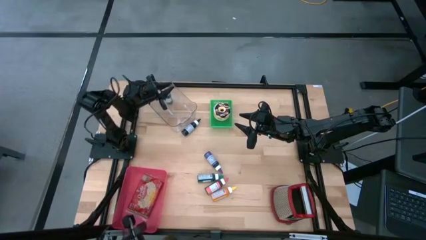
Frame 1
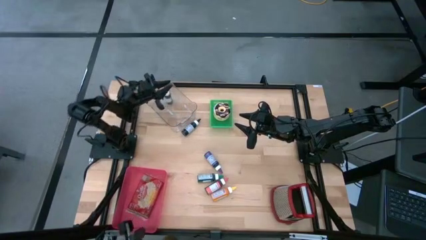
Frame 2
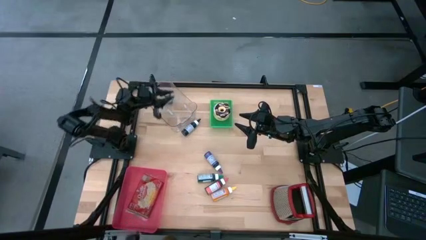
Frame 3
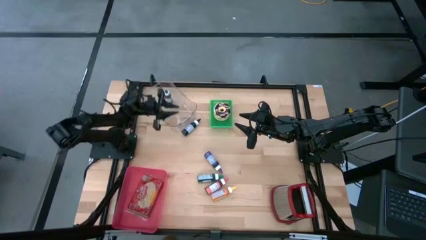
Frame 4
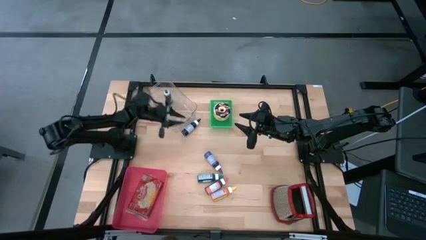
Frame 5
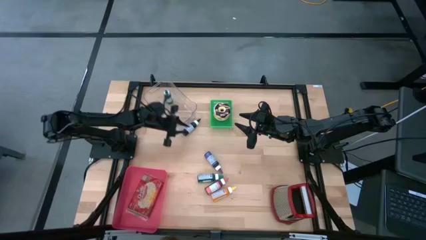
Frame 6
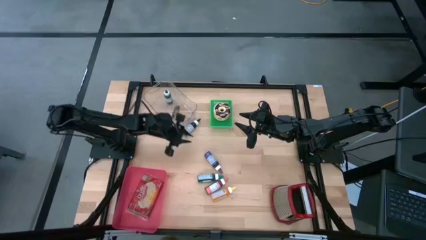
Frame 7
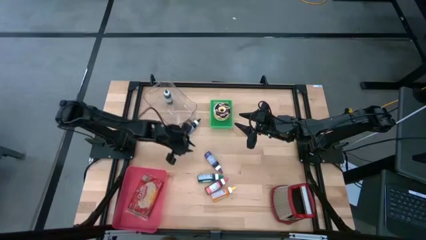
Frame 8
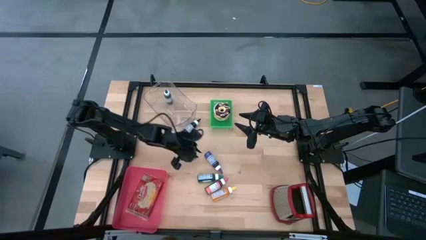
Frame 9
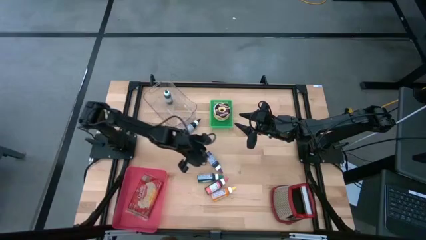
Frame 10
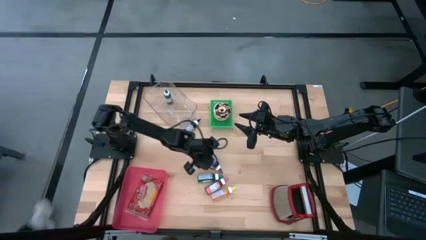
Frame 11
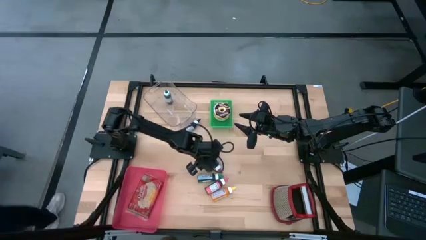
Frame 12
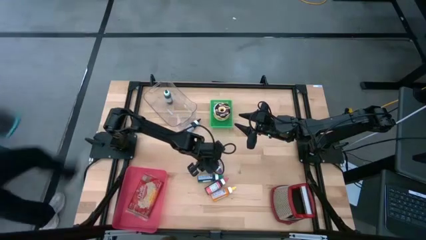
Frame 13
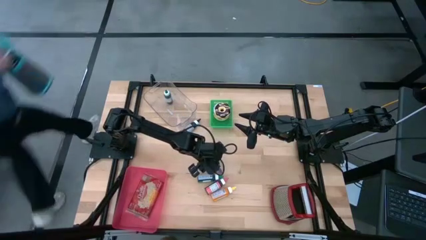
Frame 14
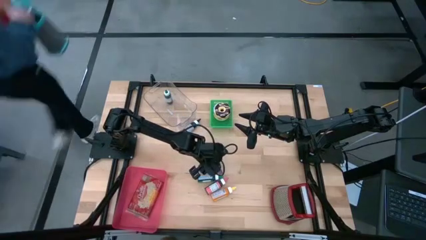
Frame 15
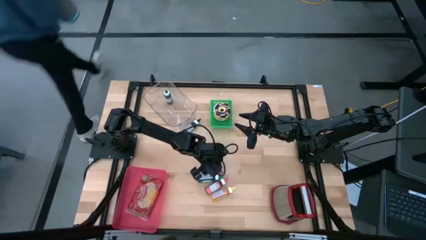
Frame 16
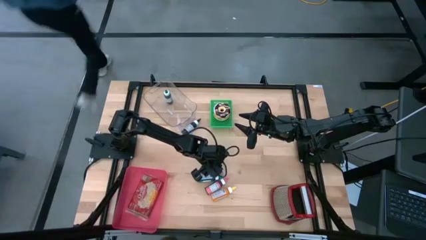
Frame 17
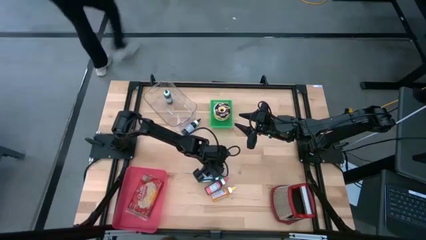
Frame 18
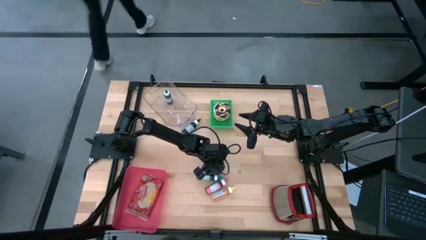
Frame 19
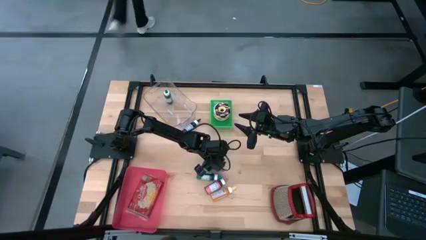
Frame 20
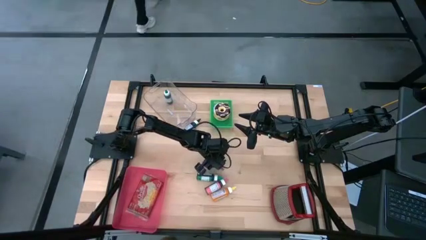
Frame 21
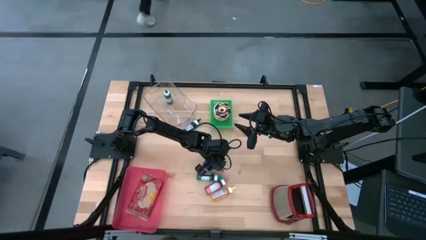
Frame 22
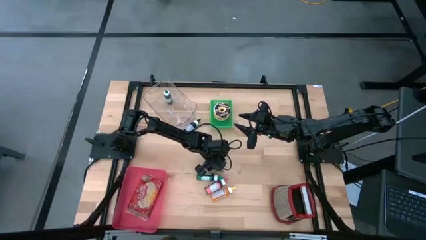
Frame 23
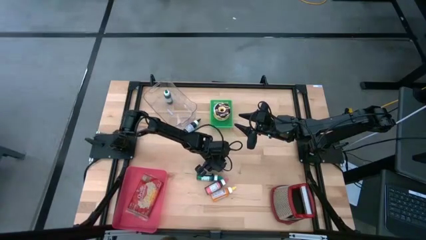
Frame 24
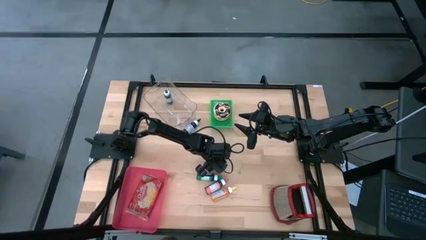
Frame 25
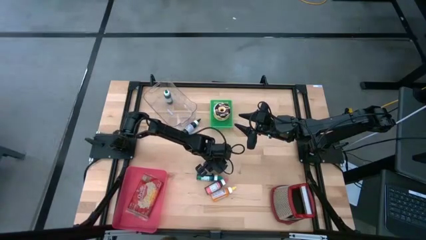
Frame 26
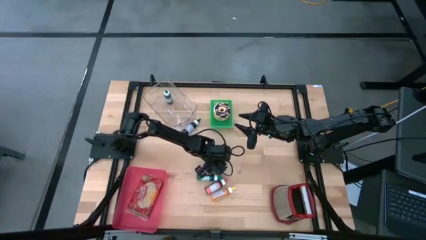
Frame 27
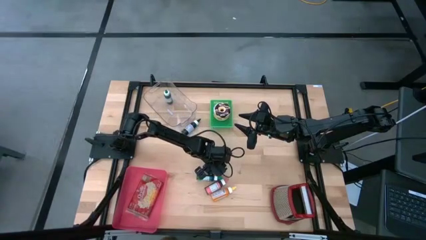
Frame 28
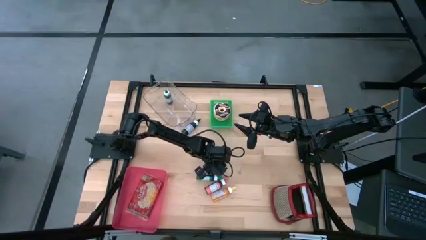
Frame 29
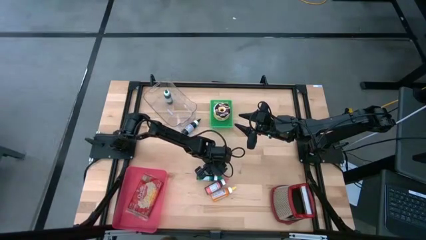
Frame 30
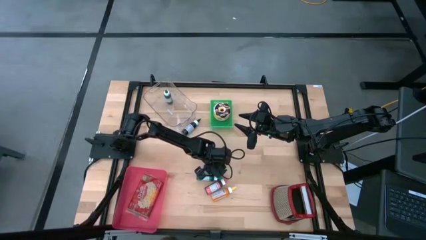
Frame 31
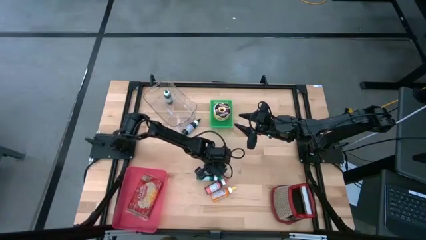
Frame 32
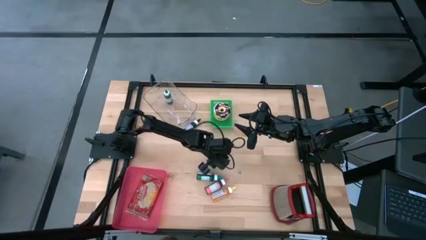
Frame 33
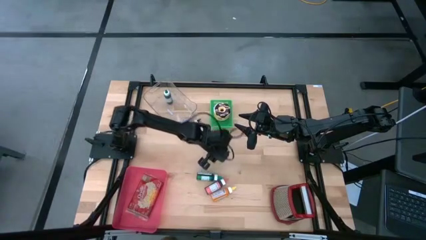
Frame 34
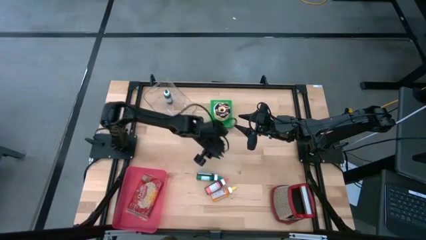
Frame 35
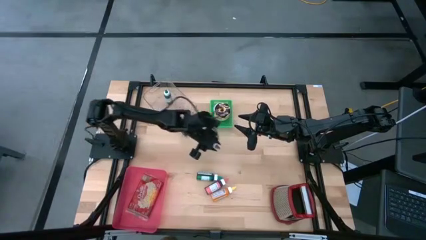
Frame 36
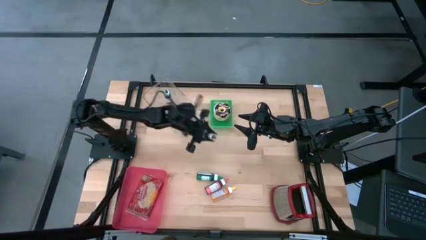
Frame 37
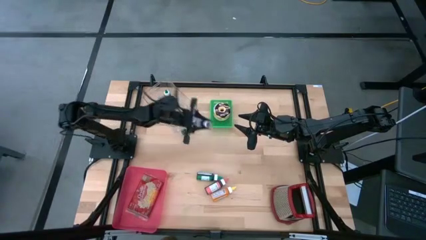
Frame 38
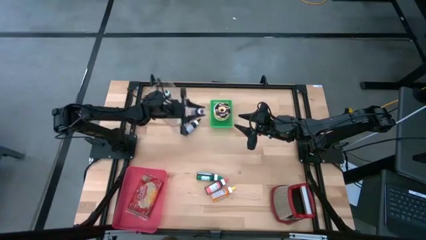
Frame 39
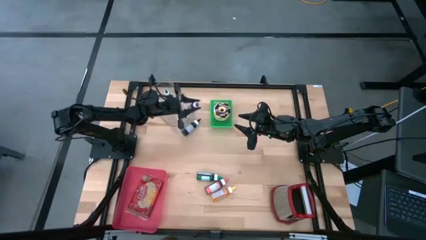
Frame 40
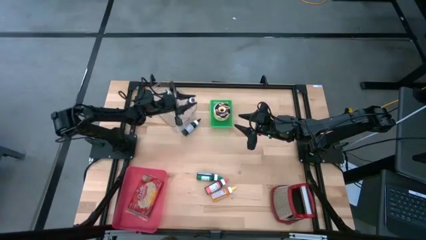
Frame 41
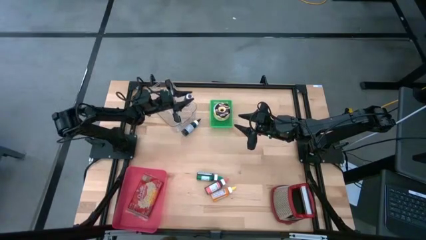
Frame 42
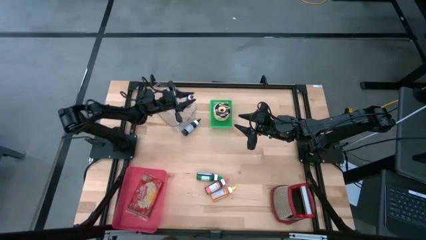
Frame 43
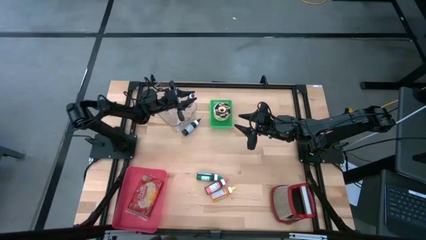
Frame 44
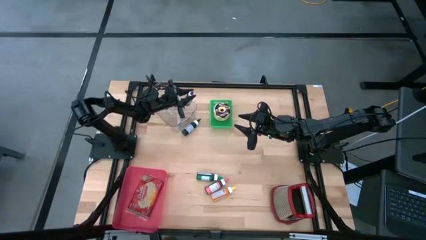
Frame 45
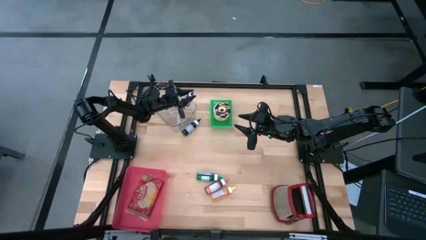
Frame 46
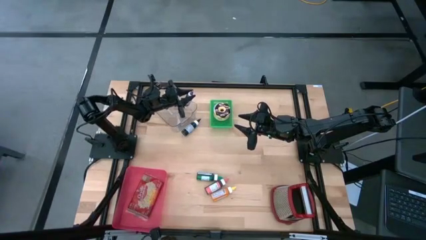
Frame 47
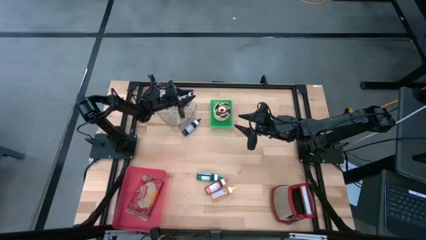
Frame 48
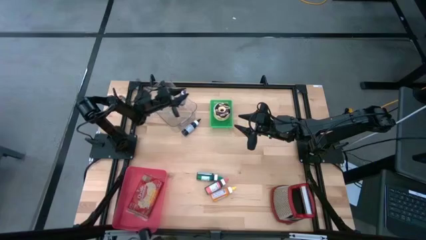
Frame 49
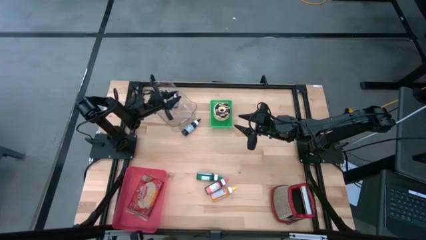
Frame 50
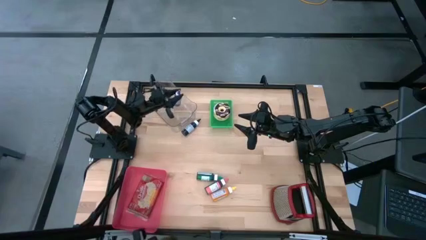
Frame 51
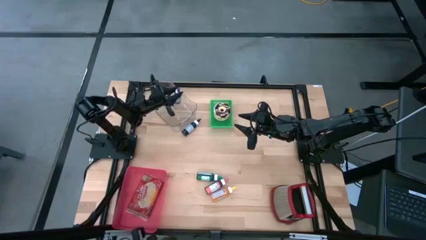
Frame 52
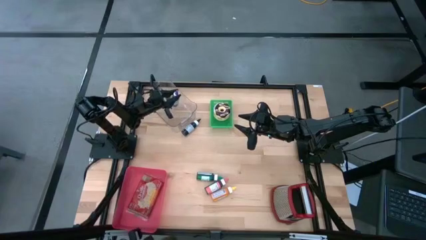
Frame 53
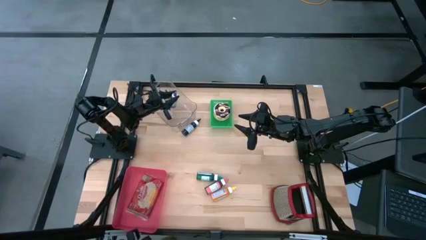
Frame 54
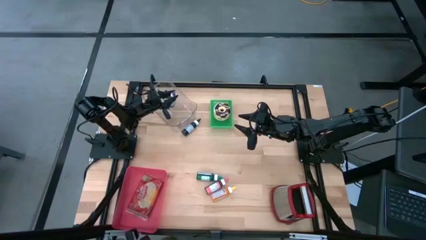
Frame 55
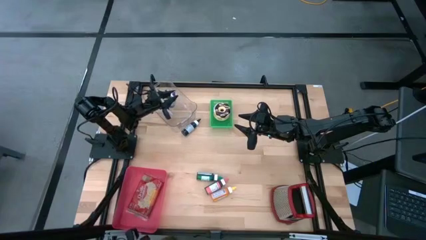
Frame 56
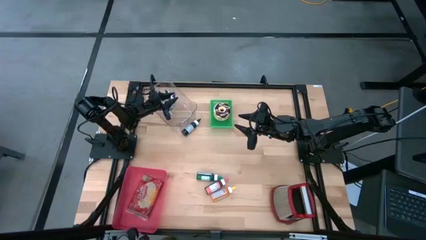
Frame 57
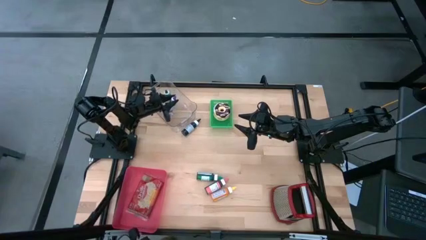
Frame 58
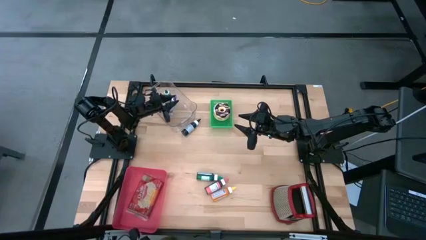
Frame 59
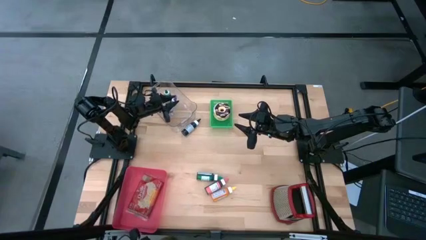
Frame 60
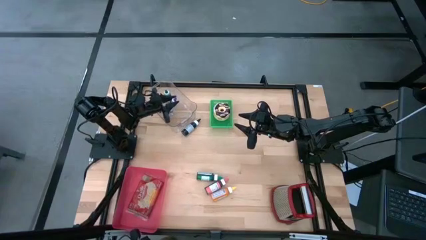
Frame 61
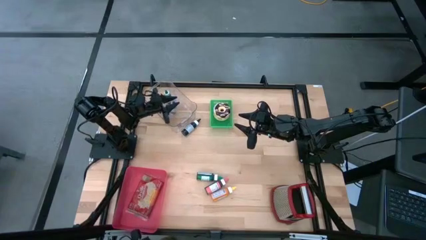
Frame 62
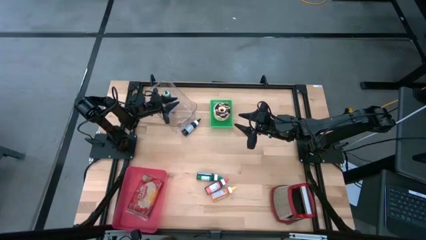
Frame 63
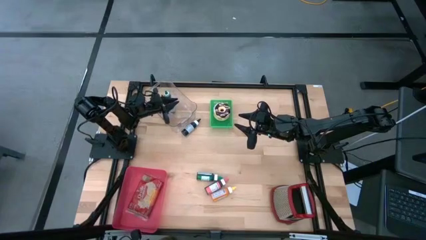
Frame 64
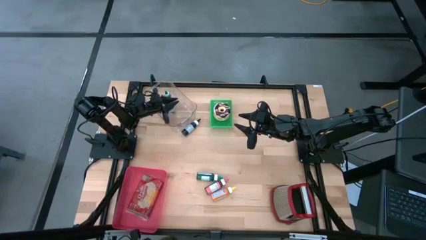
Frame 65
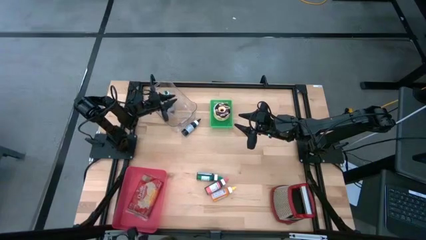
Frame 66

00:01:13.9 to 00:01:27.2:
Put the purple food coloring bottle into the transparent bin
